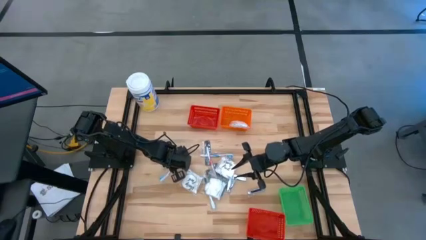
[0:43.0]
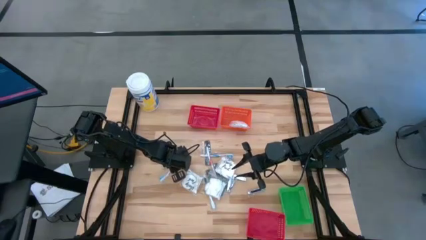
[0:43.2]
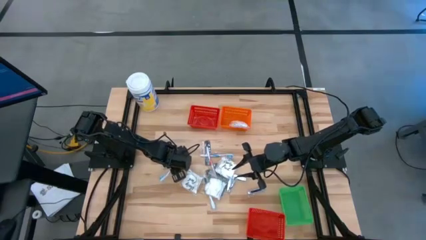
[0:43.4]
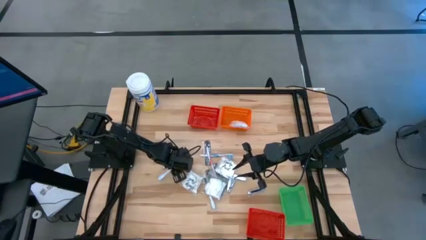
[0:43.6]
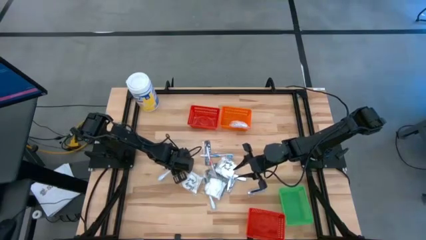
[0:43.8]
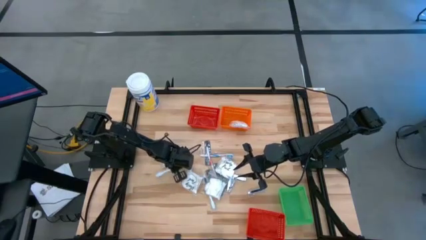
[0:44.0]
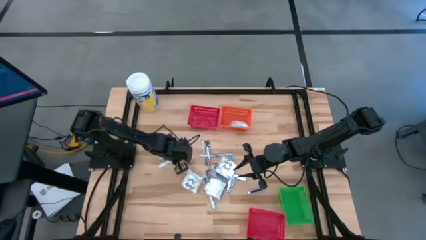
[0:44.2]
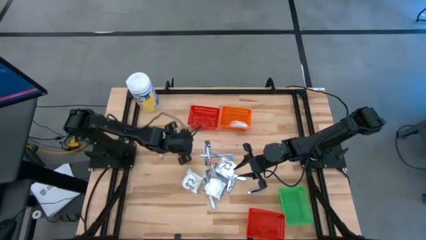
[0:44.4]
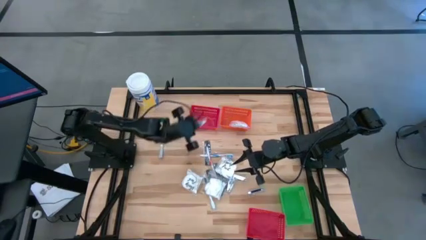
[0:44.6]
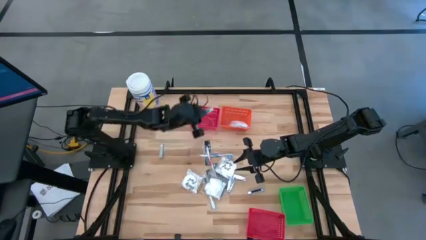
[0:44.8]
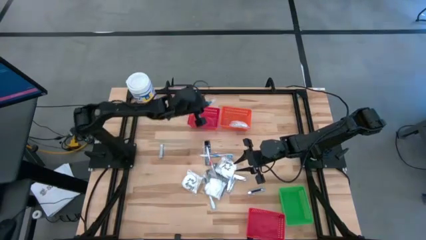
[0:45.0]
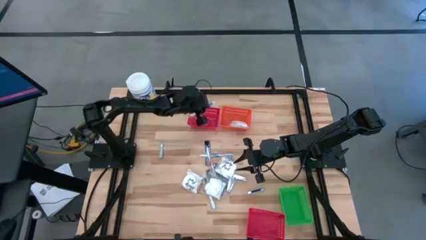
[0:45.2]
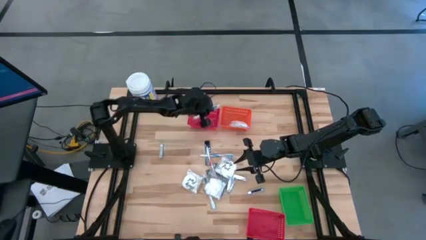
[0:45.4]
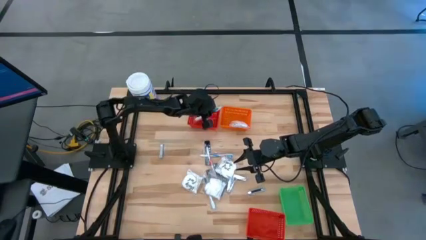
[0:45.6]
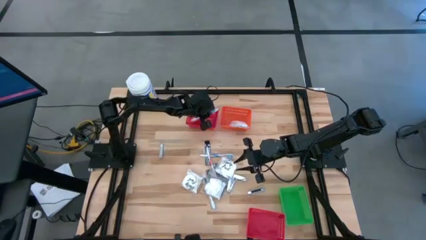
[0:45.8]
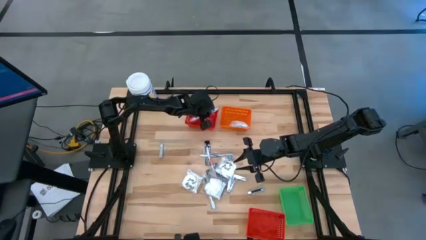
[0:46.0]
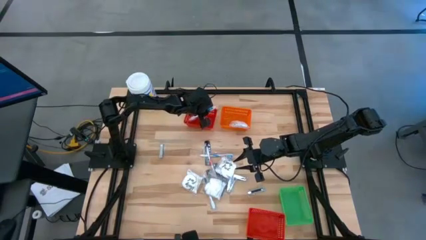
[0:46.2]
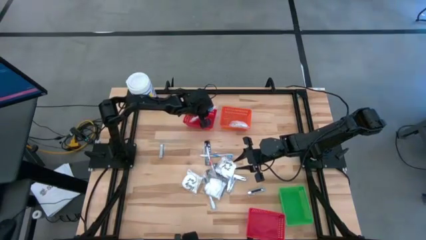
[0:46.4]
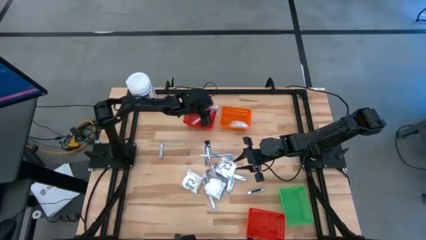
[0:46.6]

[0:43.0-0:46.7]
Task: Pick & Place Travel size toiletries
Put the blue toothbrush into the top red bin

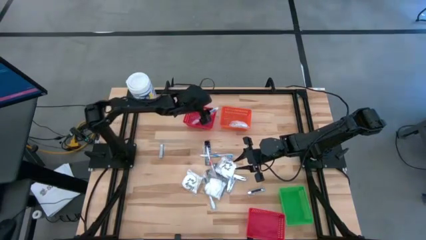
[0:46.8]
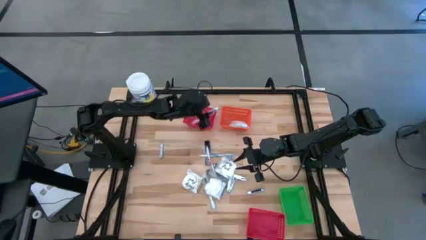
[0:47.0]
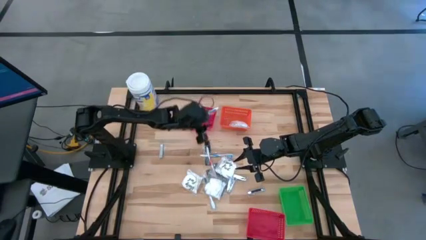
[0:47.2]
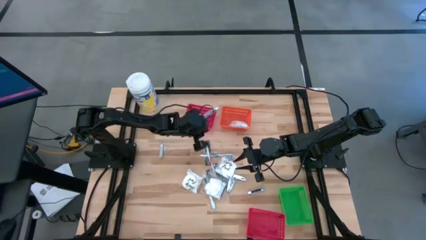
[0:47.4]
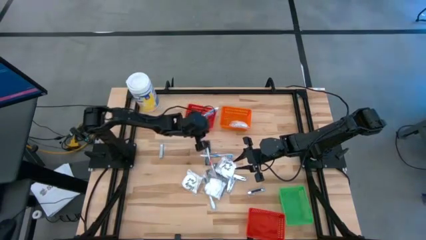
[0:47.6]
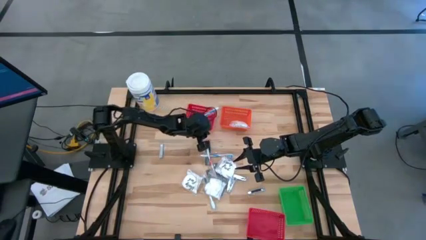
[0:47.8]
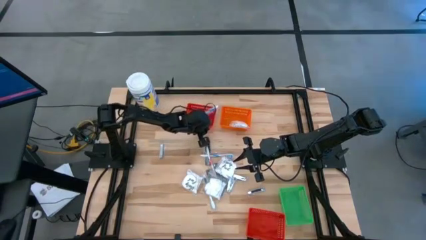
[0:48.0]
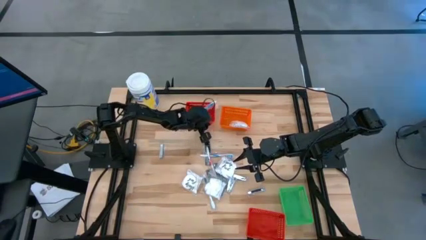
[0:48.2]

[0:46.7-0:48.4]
Adjust the top red bin

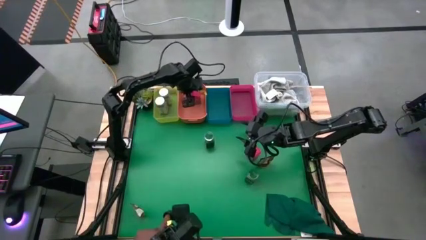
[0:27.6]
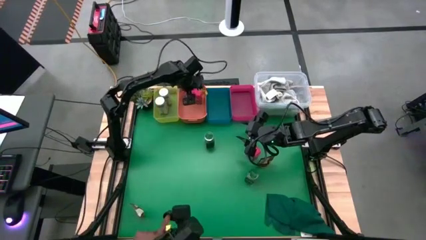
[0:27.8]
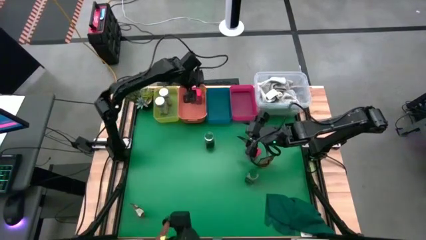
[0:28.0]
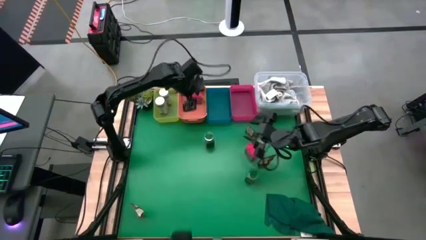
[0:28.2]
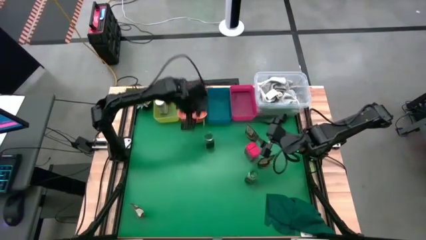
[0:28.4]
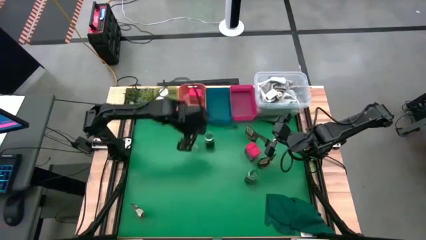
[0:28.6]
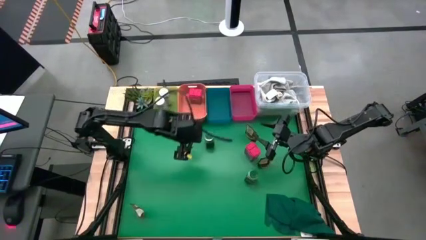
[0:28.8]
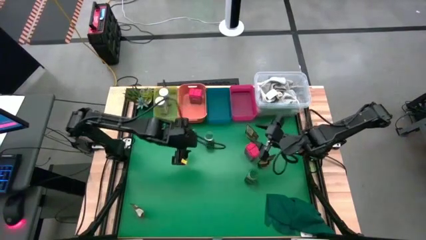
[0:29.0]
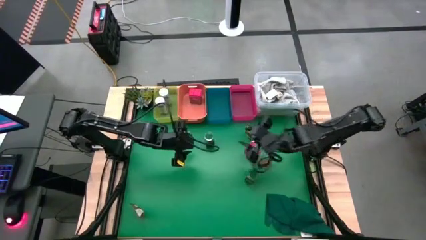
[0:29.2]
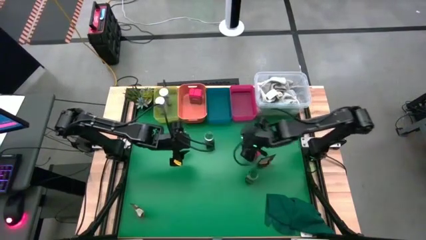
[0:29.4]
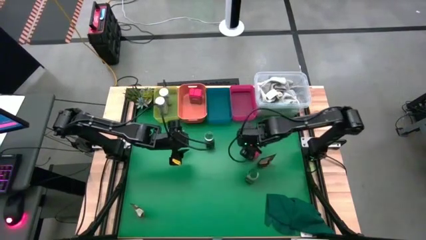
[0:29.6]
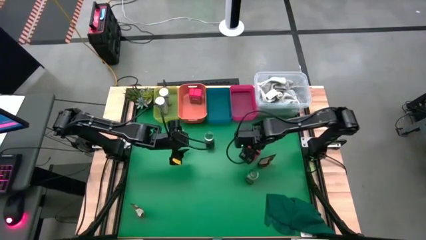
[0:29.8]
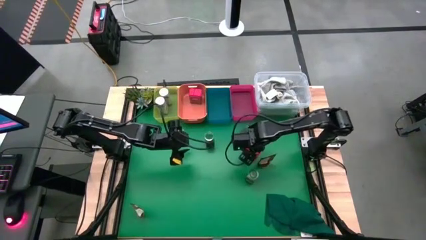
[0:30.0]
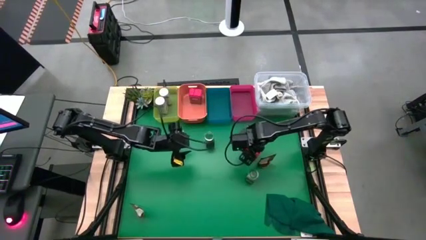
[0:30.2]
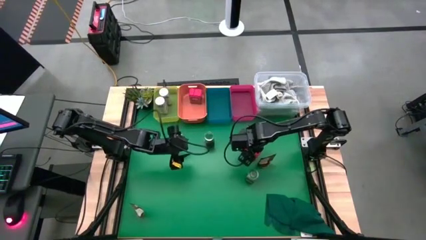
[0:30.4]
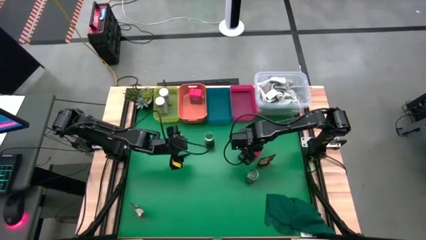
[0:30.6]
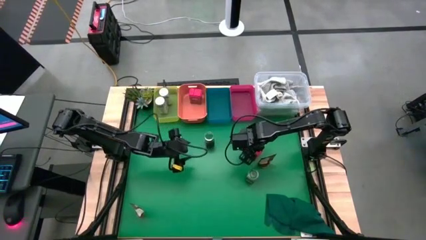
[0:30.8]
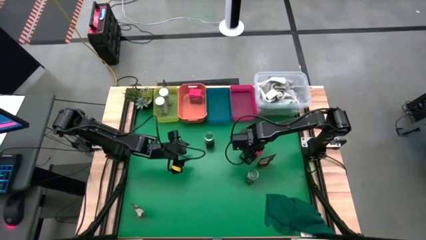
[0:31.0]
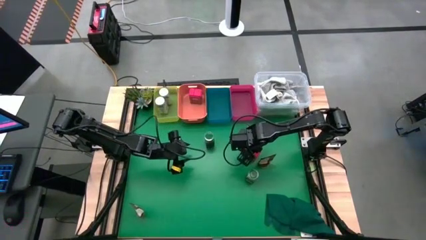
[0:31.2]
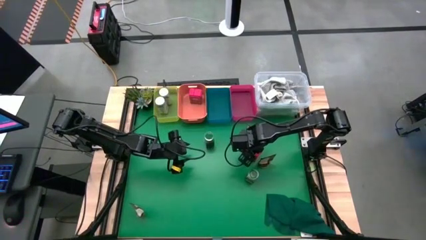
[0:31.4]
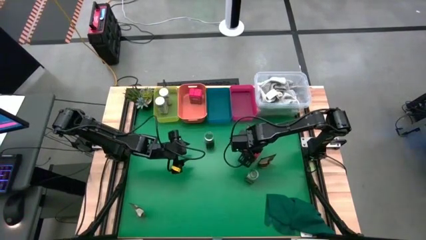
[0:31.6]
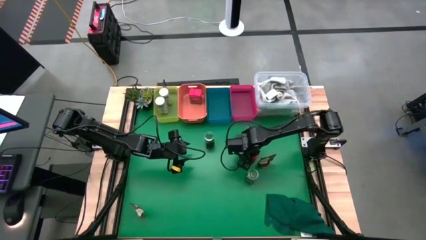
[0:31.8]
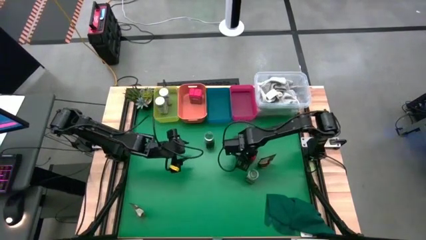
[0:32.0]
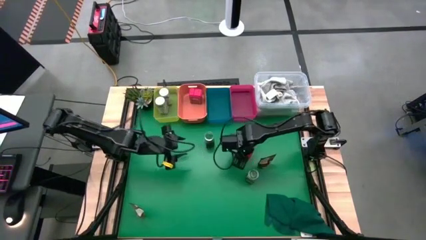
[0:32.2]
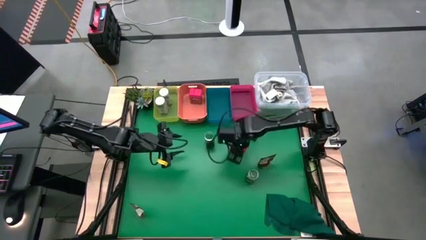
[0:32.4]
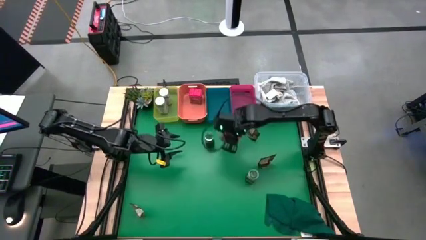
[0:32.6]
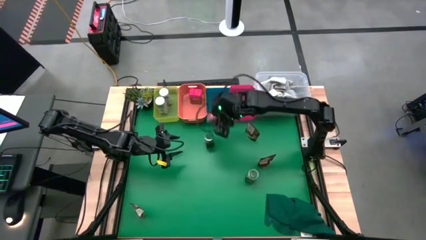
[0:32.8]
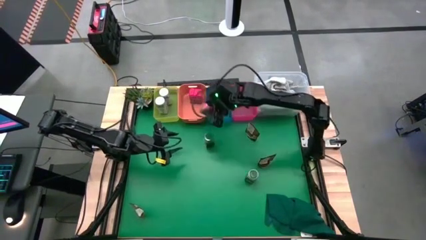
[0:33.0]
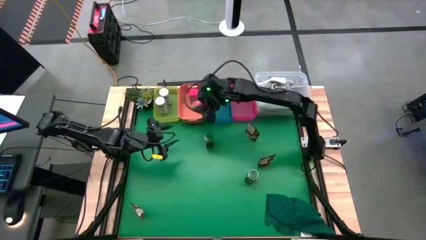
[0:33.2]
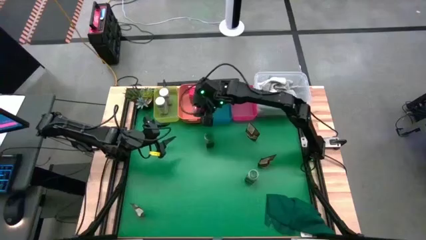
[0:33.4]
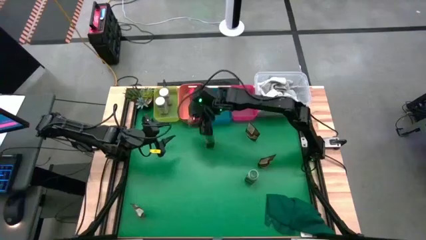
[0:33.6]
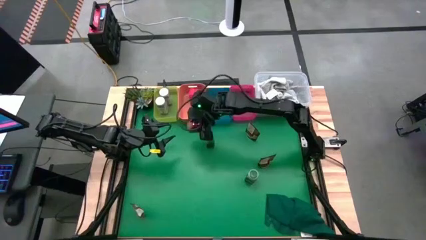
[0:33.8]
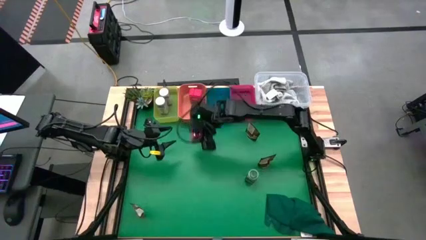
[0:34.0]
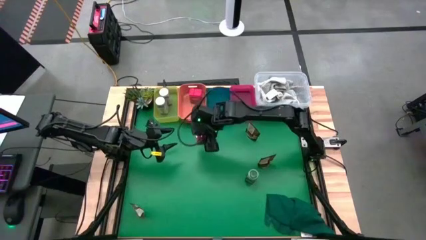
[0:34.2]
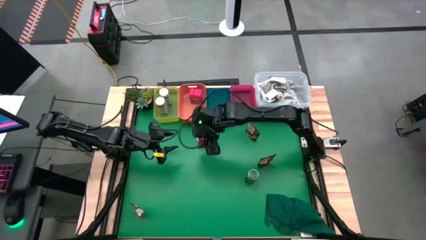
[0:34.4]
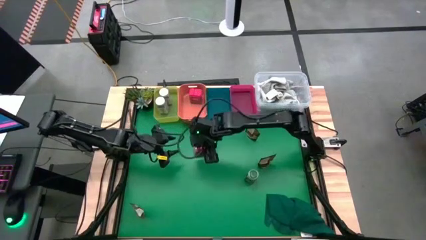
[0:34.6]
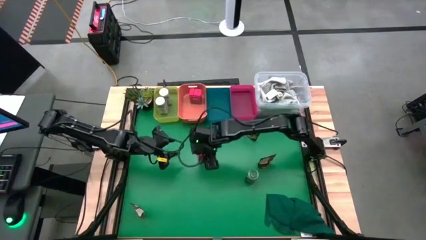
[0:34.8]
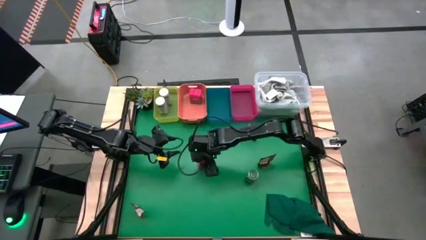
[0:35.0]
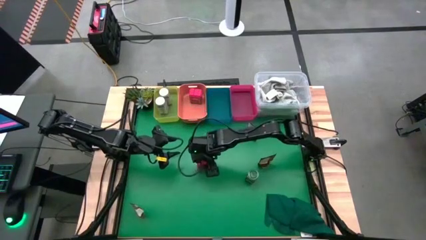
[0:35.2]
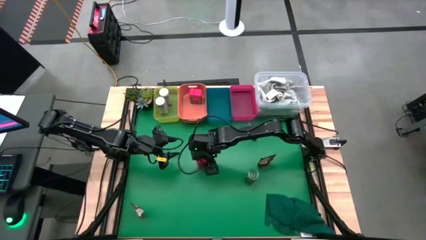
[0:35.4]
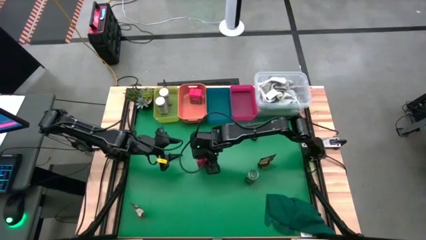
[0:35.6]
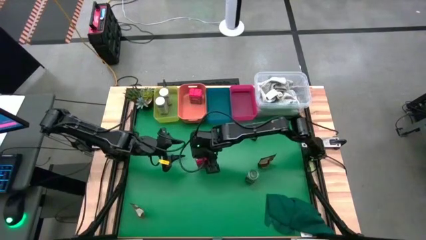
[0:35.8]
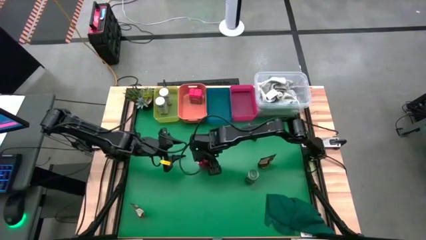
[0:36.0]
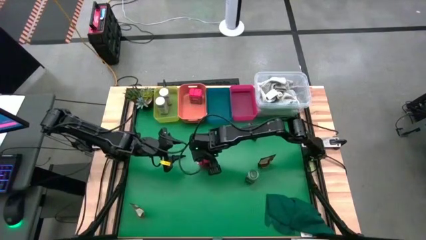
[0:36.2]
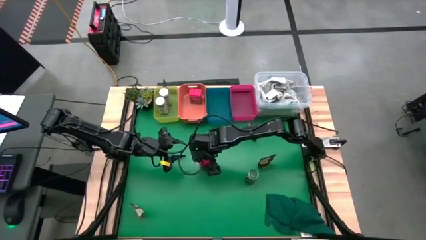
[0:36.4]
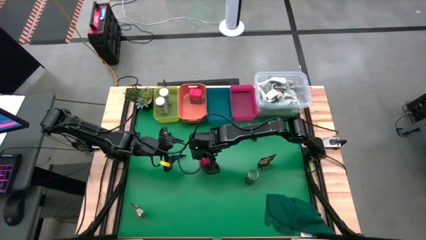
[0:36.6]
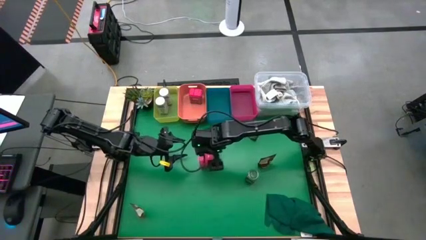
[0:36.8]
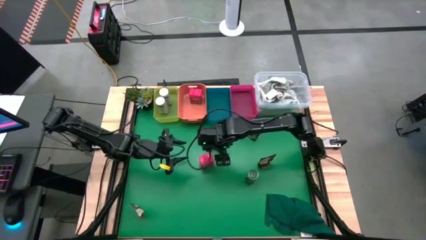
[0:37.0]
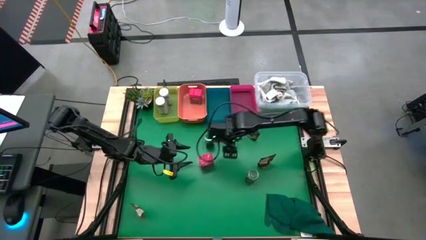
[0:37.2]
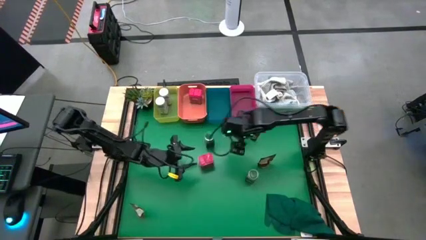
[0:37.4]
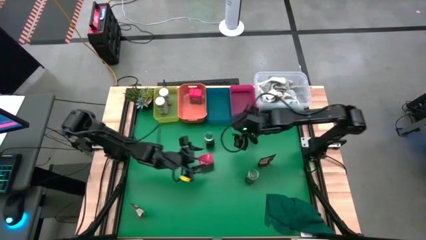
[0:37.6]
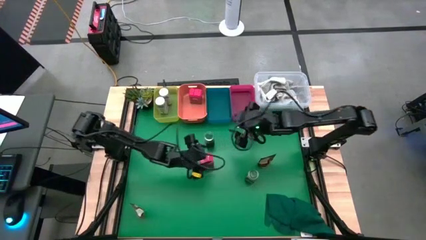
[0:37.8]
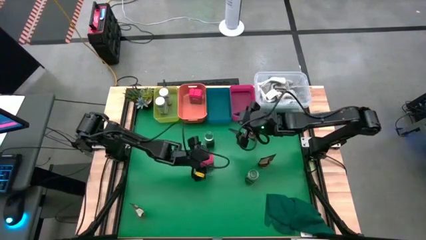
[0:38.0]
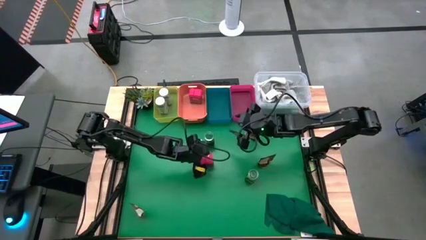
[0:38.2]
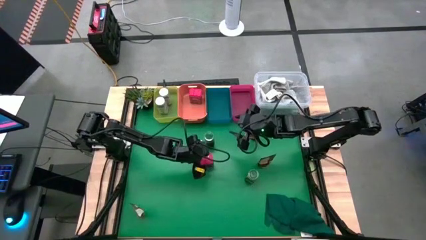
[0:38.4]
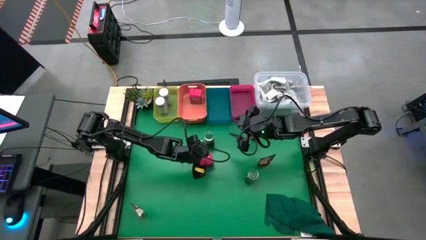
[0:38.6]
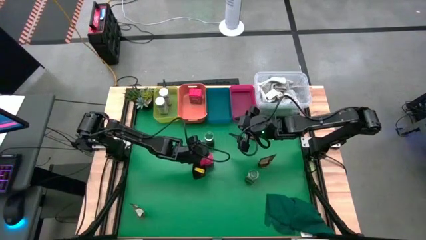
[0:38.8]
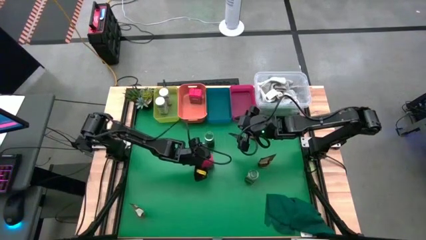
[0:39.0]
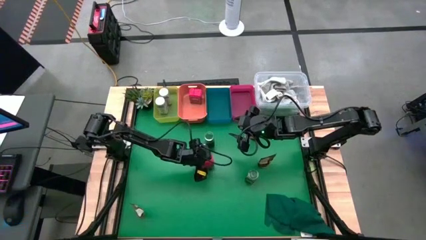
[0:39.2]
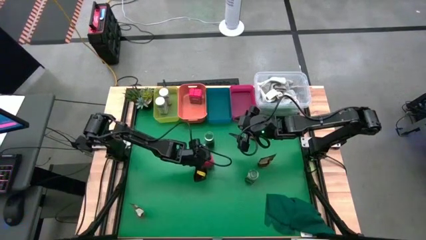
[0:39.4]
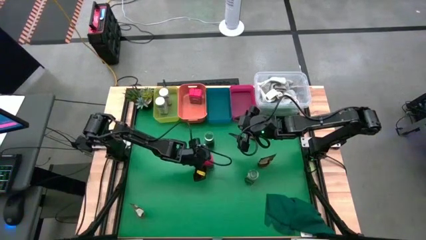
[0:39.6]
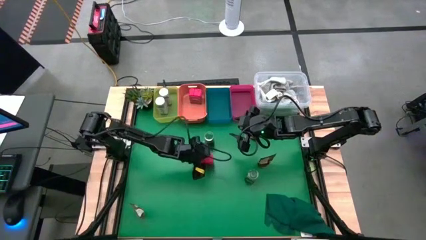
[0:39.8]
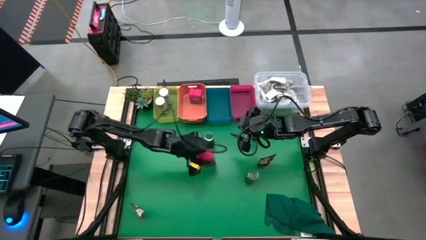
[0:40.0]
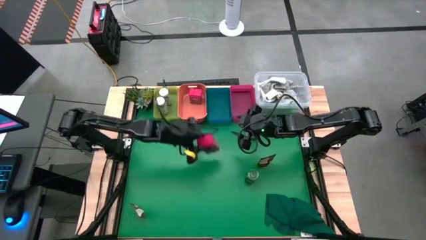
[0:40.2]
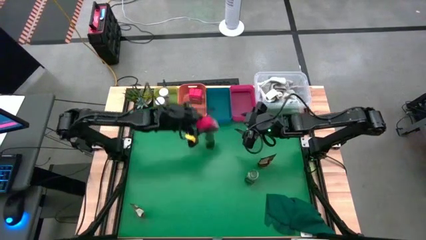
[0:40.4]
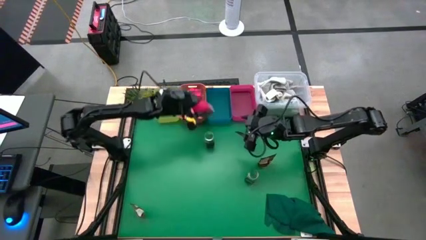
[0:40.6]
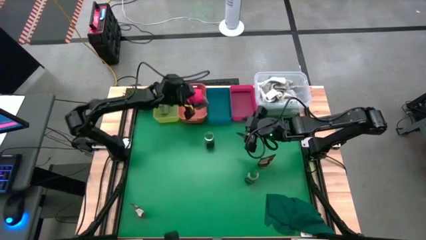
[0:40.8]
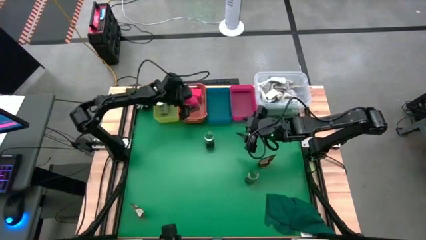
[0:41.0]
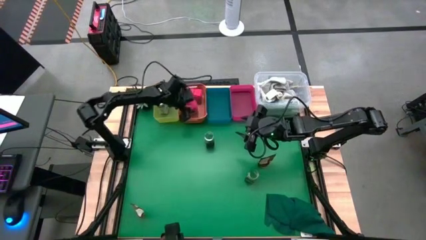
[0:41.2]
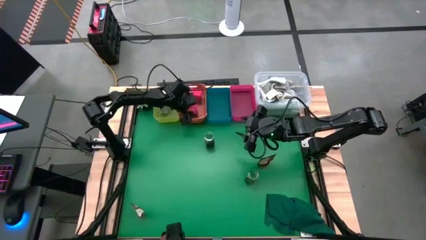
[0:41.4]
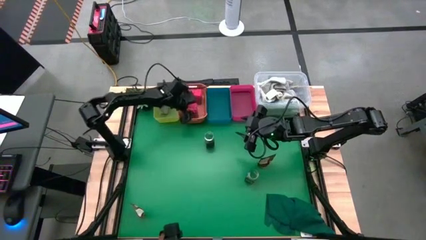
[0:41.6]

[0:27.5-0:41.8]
Task: Sort spices by type
Put the red seasoning bottle into the orange bin
